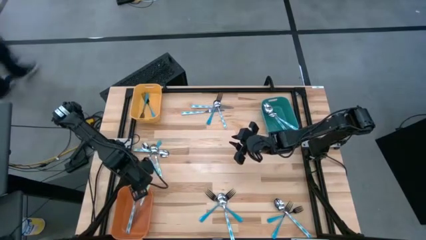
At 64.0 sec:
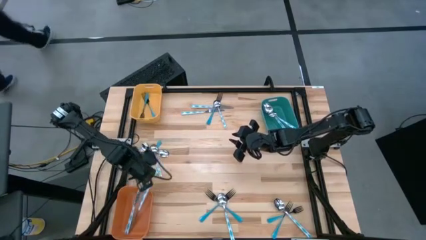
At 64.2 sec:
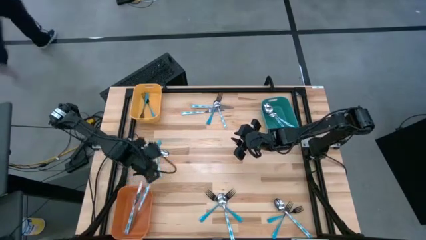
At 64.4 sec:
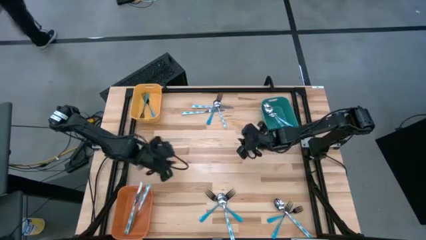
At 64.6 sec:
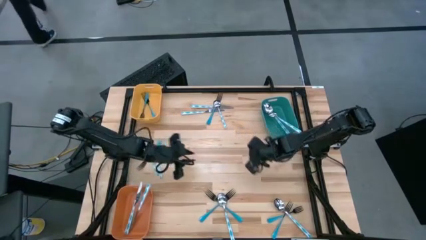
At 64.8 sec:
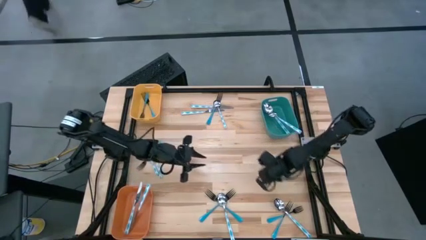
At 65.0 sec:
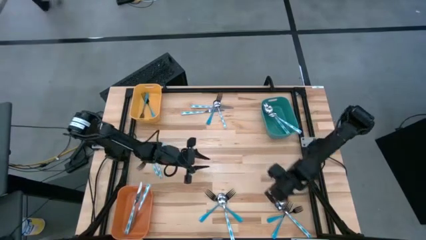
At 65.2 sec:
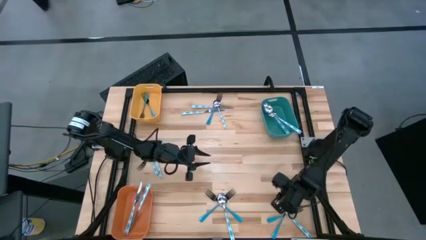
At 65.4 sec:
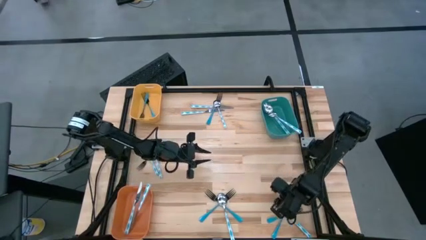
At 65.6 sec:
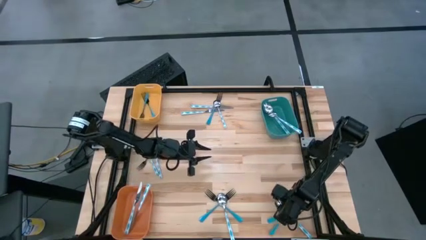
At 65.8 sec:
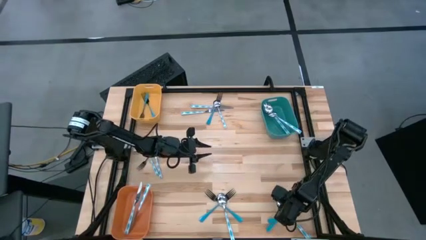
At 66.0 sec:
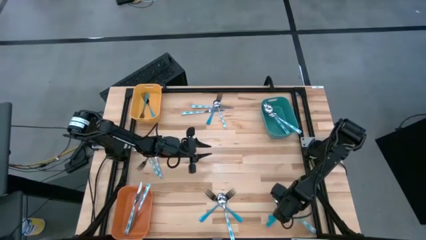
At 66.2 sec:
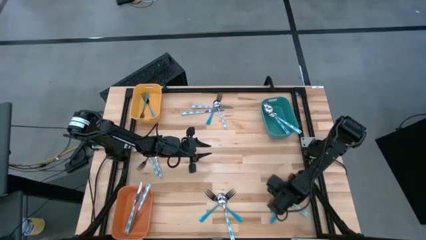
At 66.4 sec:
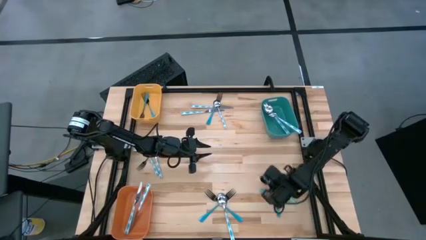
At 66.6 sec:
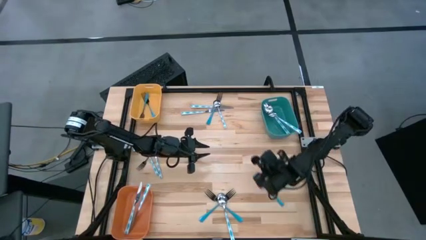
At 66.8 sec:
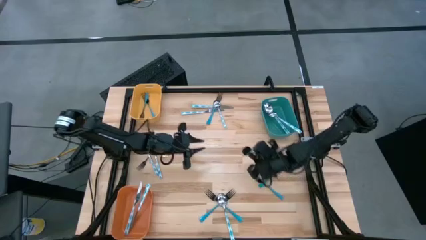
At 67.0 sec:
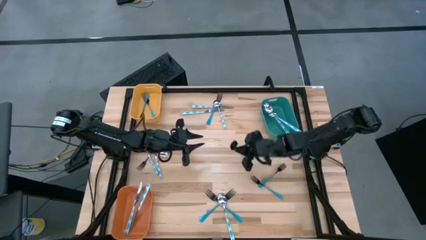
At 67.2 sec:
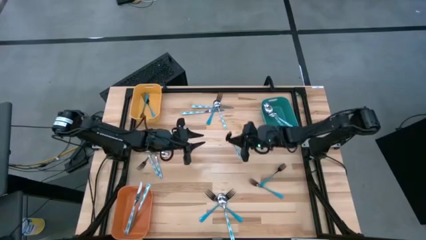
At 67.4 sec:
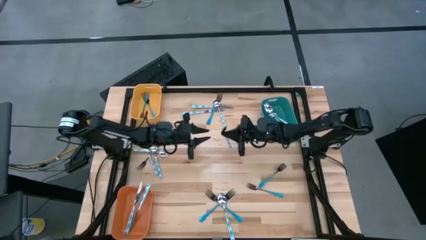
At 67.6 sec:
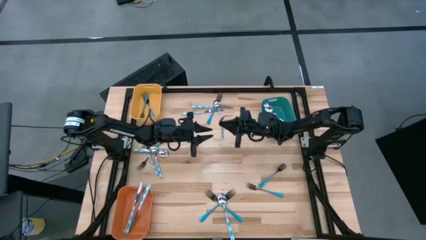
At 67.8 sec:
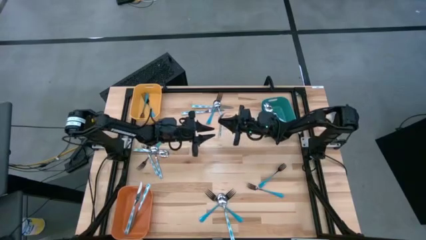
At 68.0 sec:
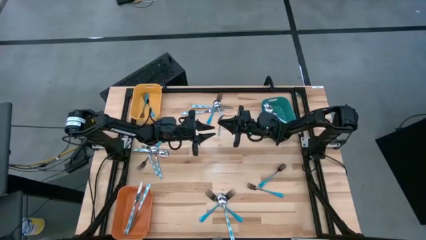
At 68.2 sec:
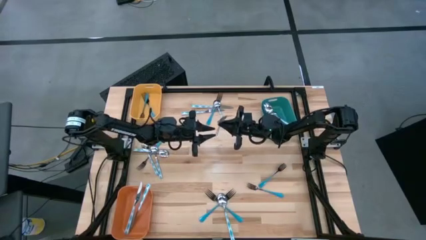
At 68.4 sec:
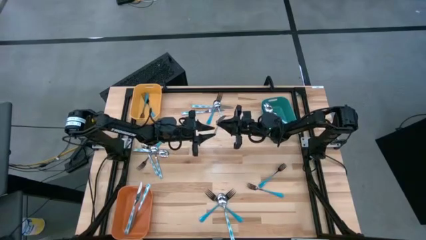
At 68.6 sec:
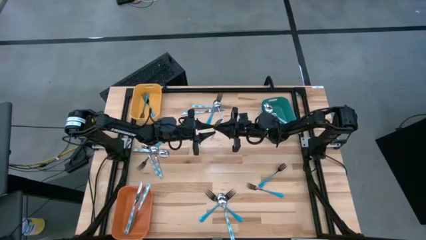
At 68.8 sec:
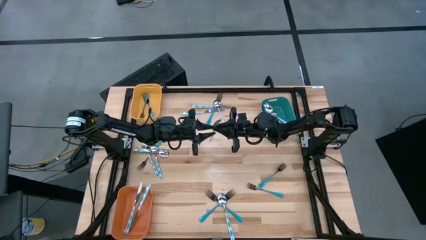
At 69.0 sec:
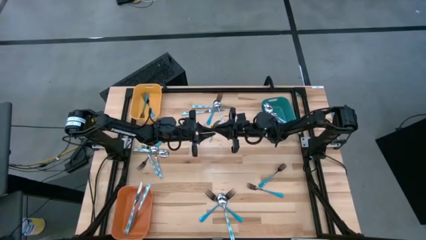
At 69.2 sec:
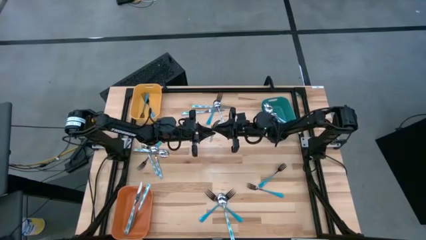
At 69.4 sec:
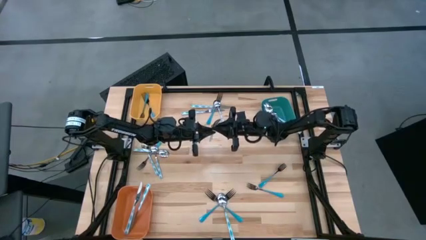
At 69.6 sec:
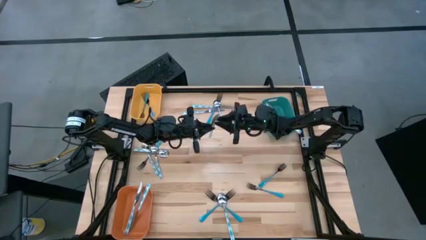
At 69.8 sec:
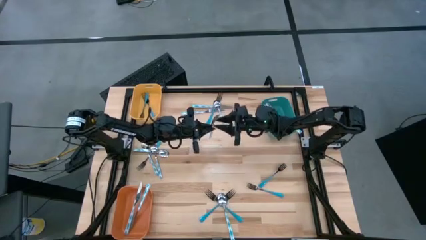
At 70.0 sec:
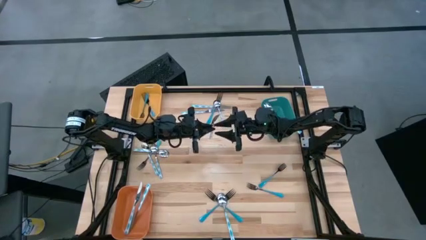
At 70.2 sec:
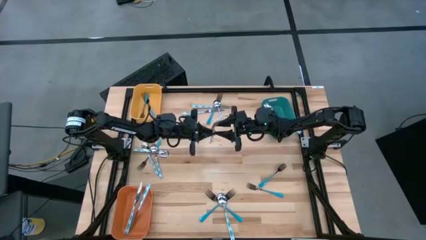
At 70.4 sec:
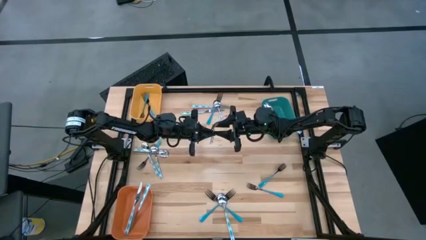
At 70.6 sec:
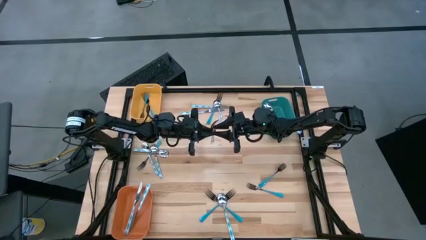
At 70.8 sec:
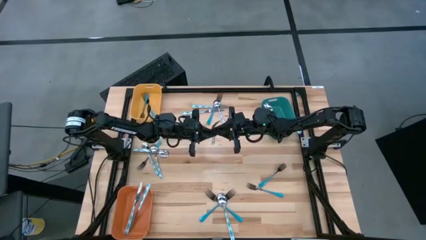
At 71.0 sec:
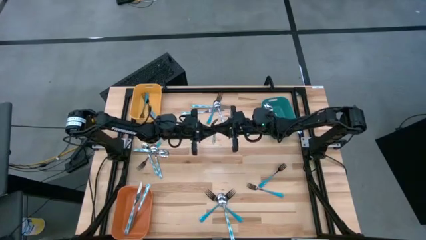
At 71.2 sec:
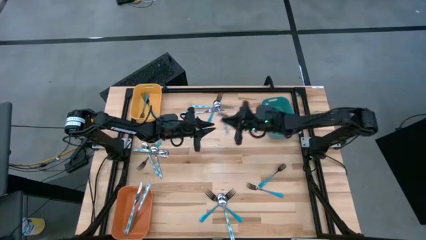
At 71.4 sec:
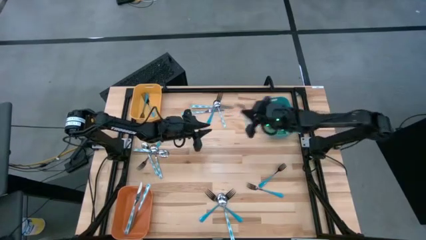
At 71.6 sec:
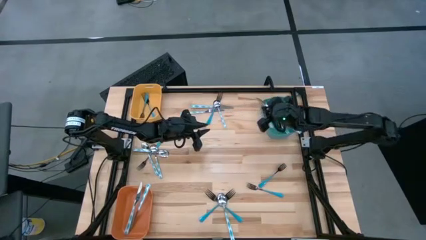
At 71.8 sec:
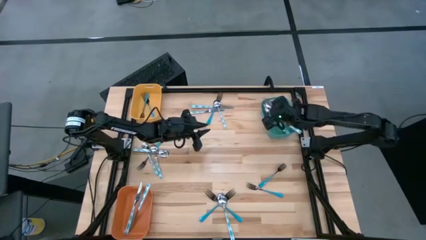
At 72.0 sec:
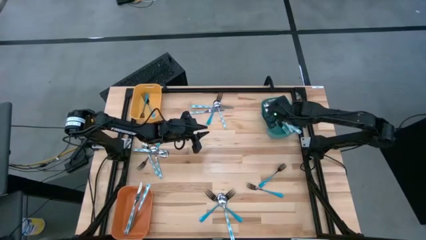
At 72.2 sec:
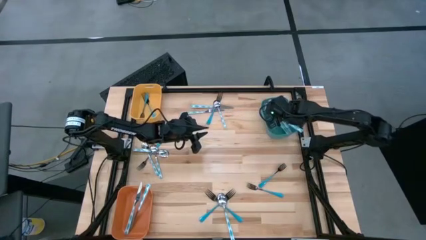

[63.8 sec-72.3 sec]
Task: Sort silverware by color (type)
Put the white-blue spoon into the blue bin

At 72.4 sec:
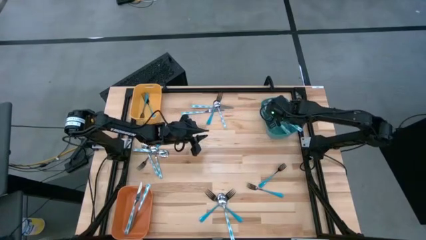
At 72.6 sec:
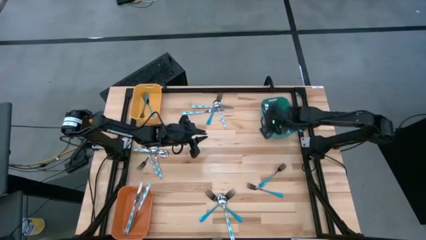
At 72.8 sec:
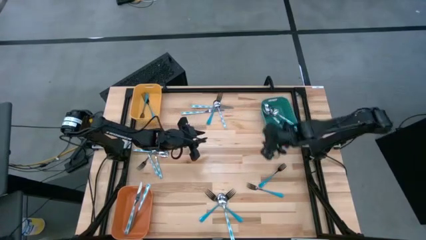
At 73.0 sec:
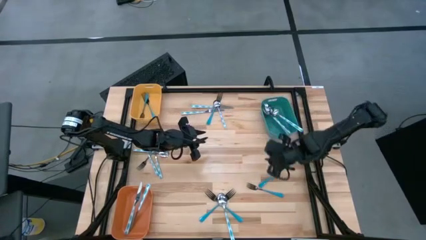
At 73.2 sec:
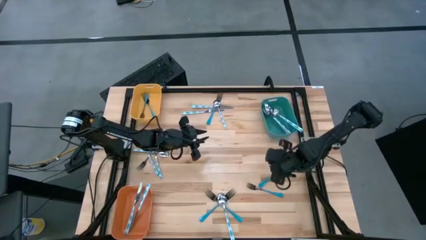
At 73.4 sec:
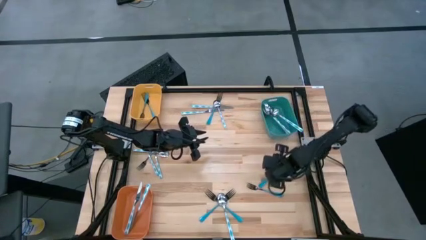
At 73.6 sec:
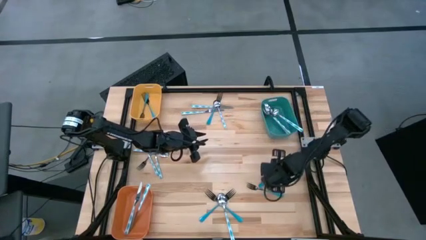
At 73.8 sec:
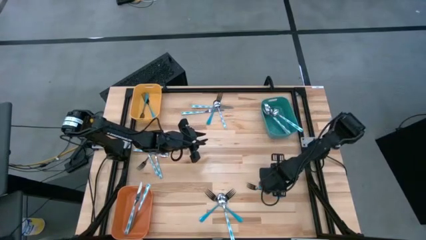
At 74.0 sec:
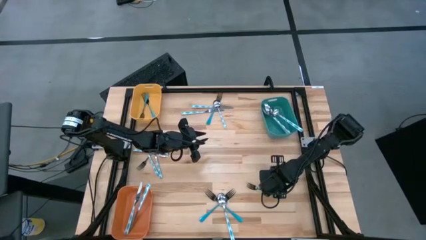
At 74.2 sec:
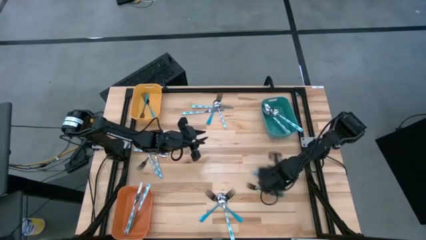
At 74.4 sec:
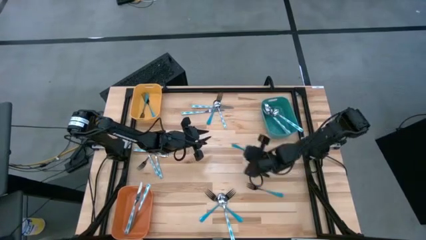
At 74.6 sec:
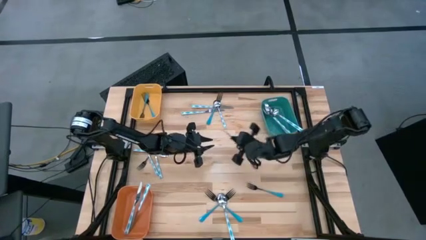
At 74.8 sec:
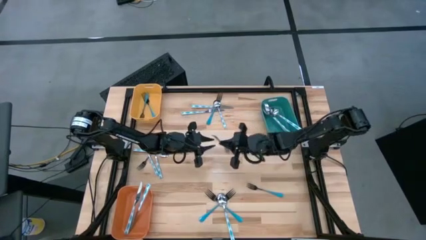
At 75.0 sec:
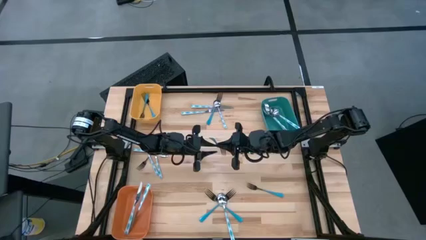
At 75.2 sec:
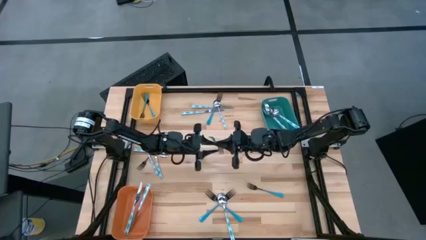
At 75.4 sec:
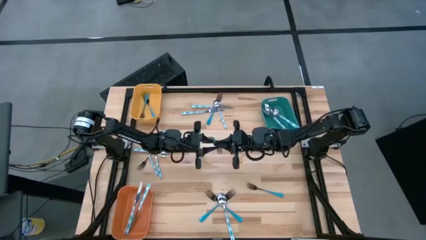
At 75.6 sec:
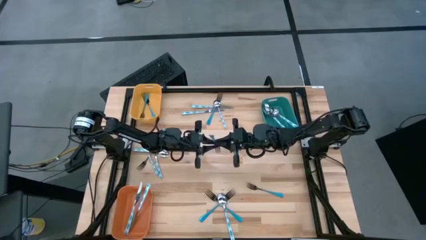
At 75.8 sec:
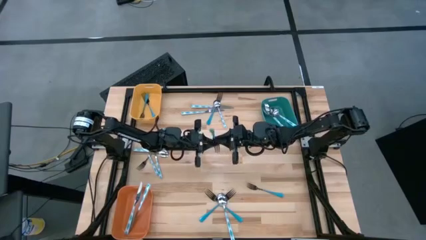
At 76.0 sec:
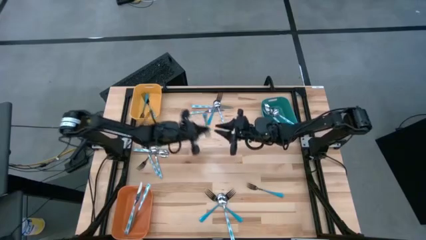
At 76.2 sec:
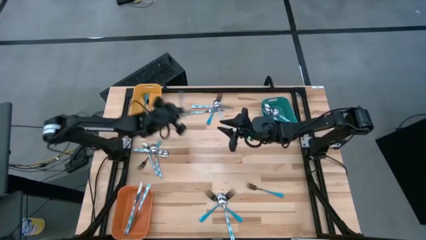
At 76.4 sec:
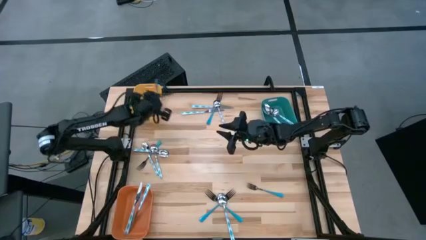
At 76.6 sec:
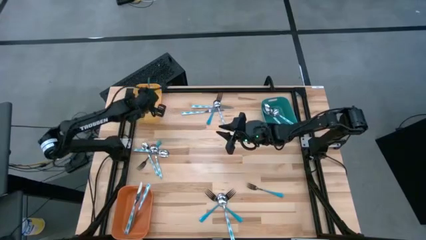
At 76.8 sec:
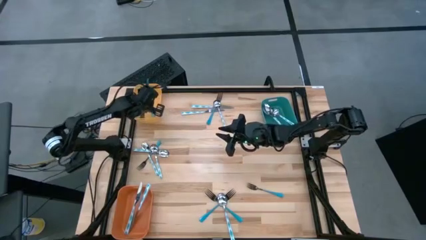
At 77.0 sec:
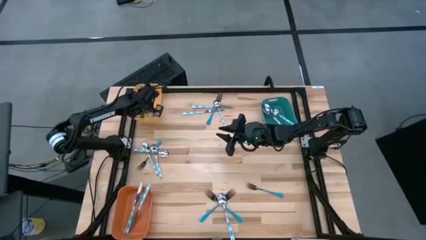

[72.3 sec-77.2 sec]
Put the blue fork into the yellow bin
